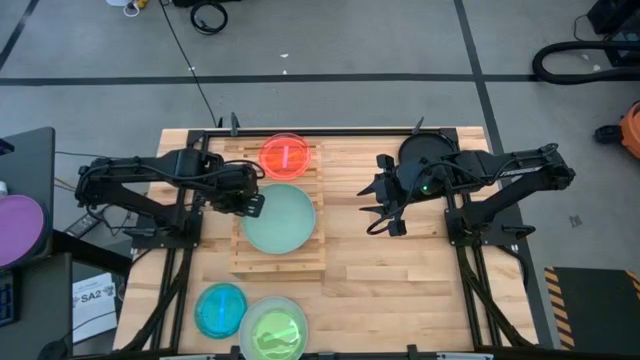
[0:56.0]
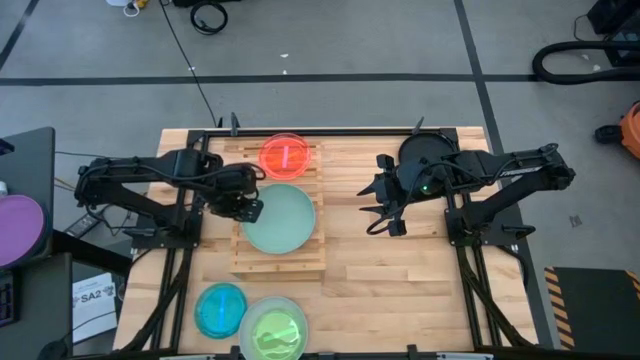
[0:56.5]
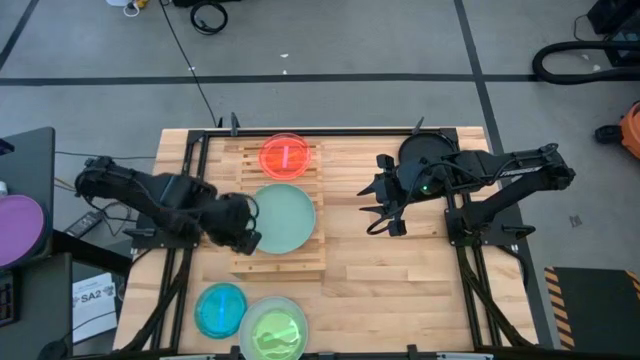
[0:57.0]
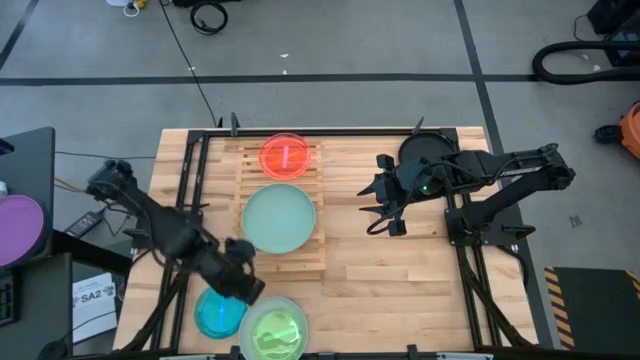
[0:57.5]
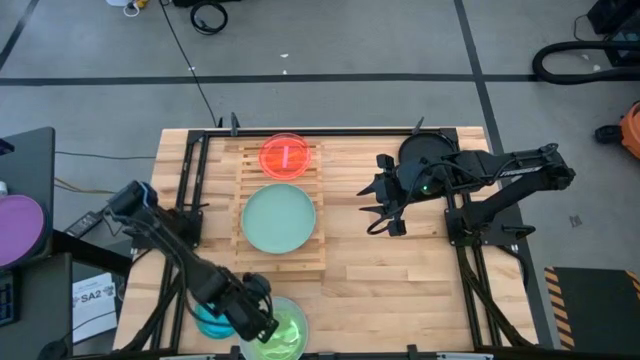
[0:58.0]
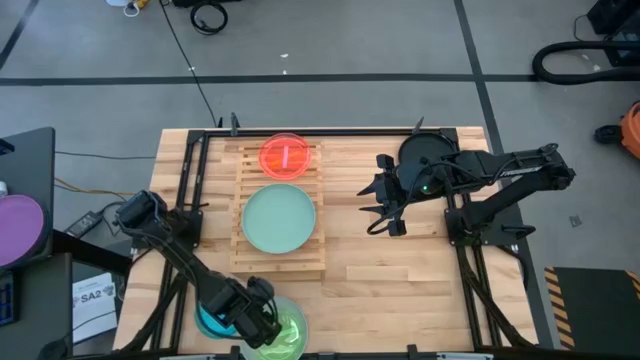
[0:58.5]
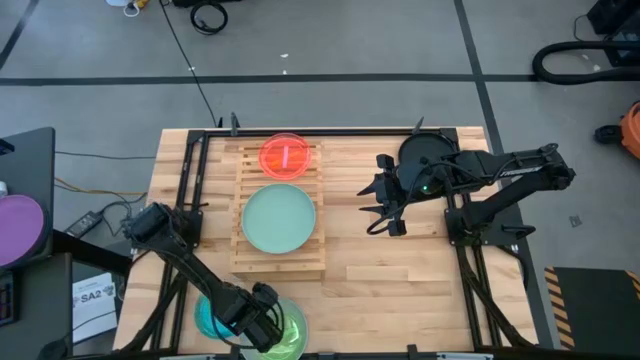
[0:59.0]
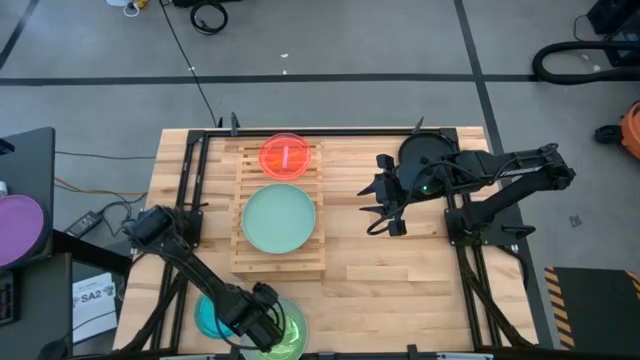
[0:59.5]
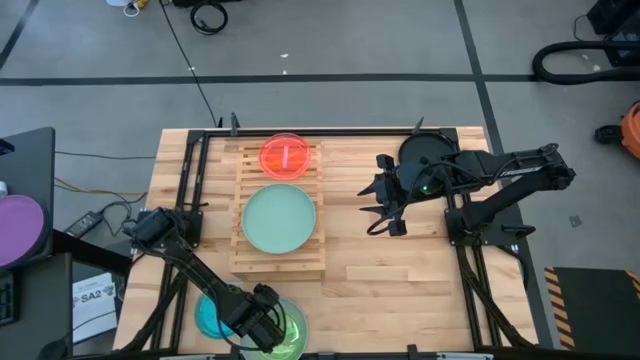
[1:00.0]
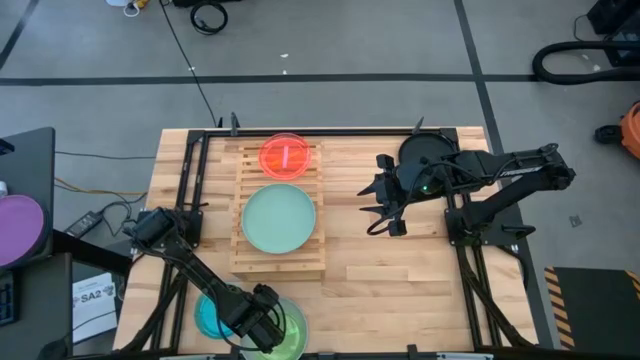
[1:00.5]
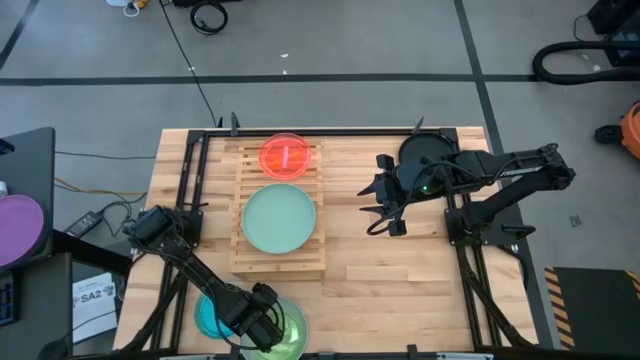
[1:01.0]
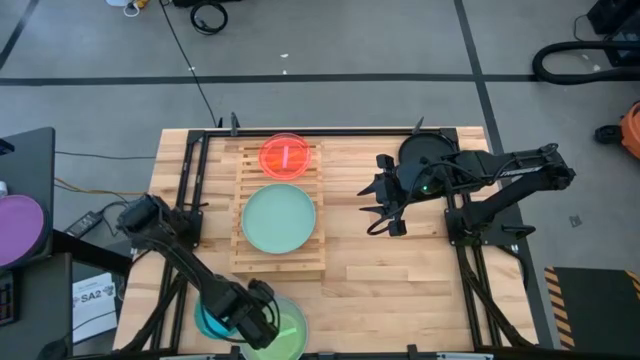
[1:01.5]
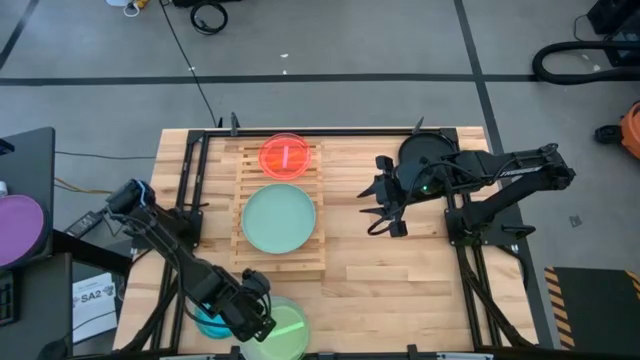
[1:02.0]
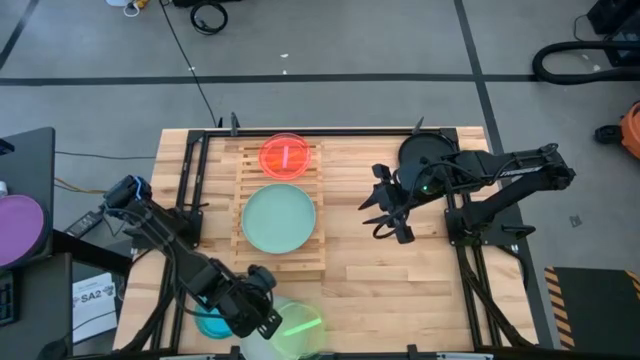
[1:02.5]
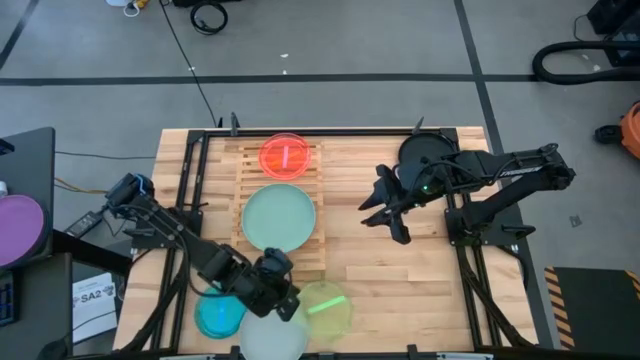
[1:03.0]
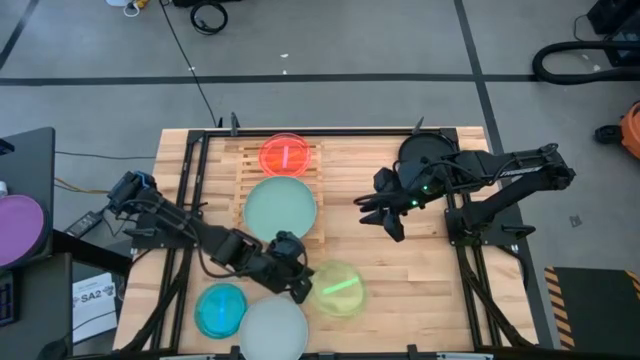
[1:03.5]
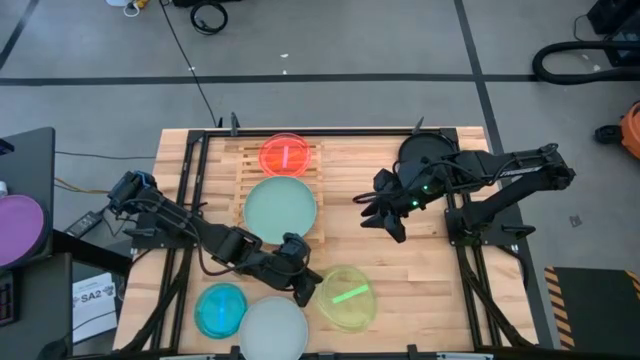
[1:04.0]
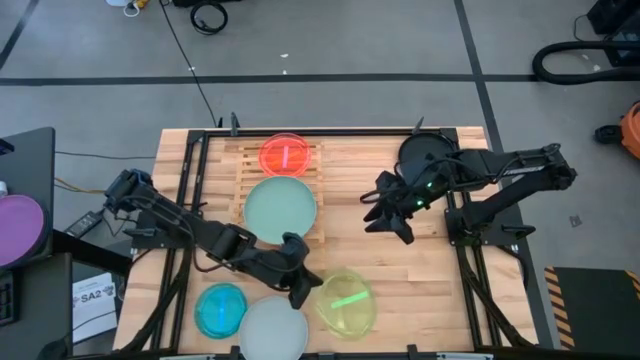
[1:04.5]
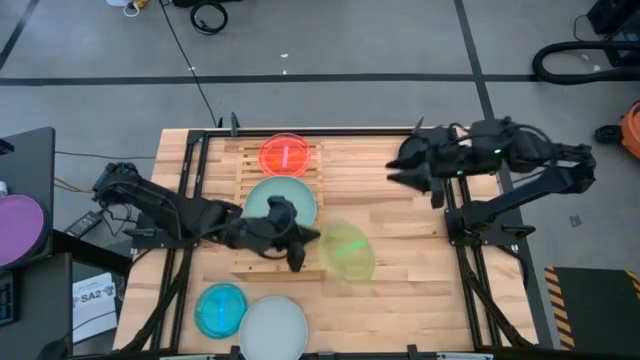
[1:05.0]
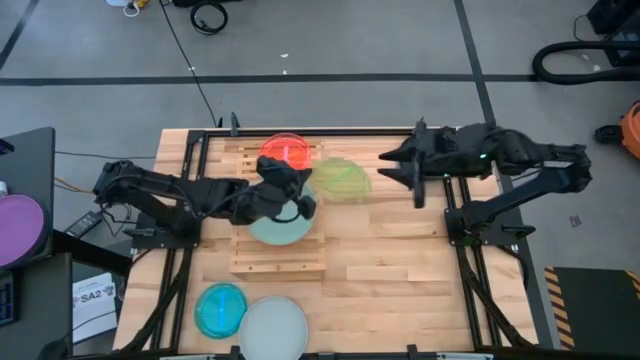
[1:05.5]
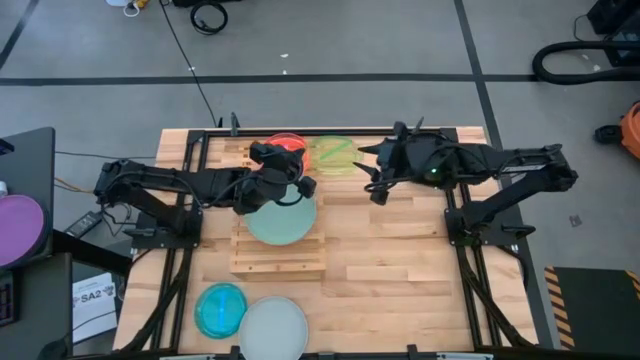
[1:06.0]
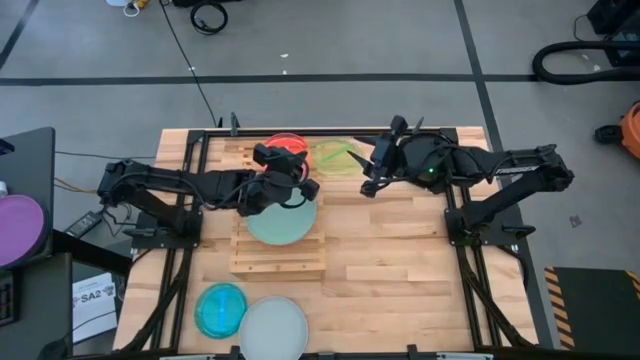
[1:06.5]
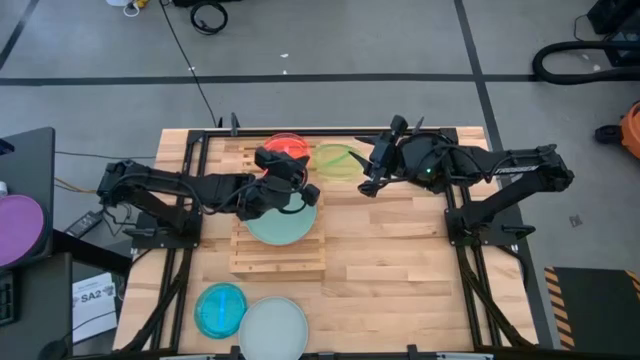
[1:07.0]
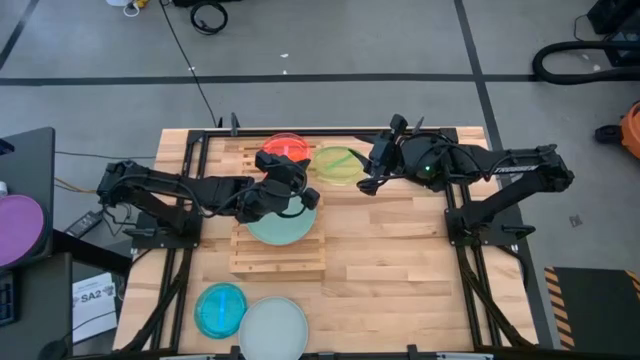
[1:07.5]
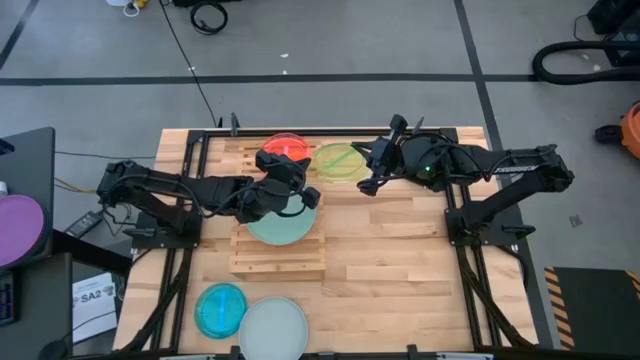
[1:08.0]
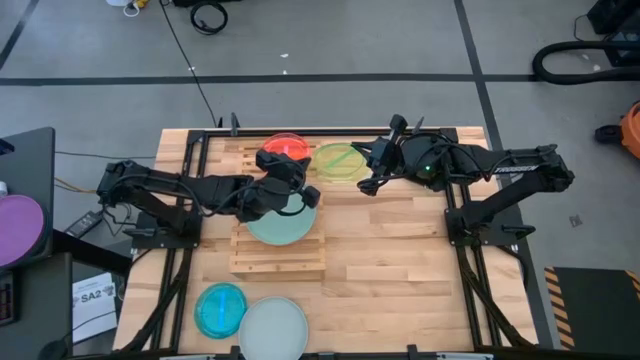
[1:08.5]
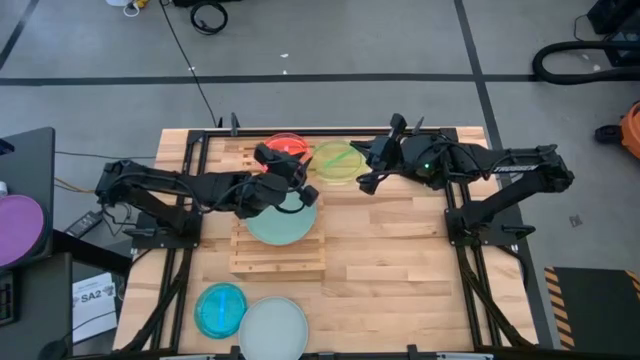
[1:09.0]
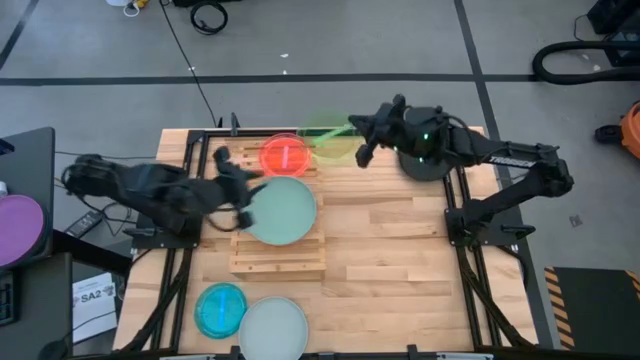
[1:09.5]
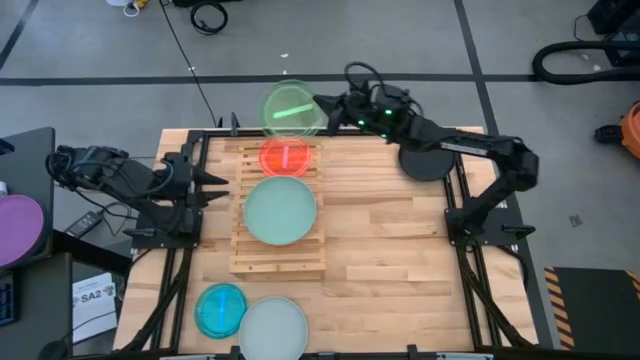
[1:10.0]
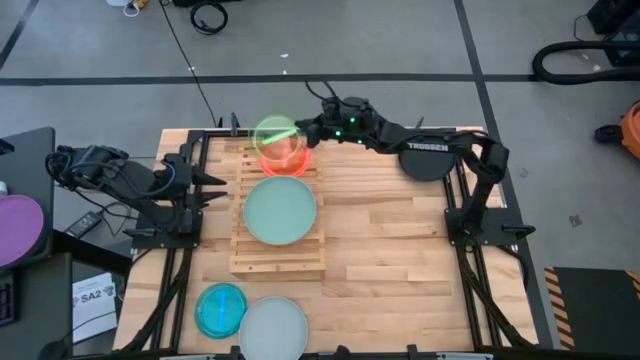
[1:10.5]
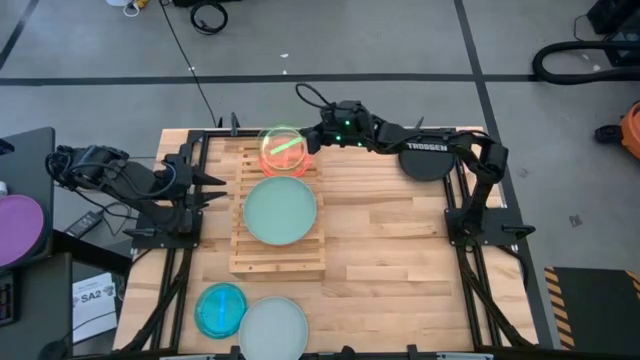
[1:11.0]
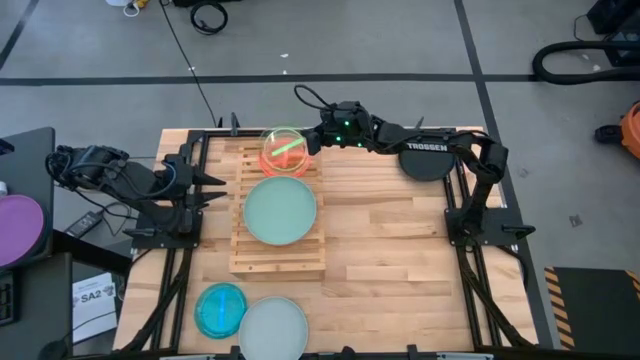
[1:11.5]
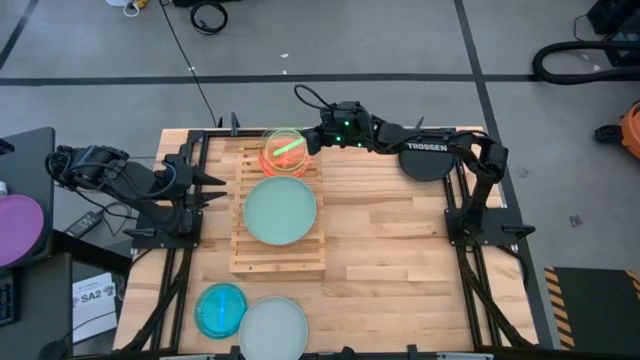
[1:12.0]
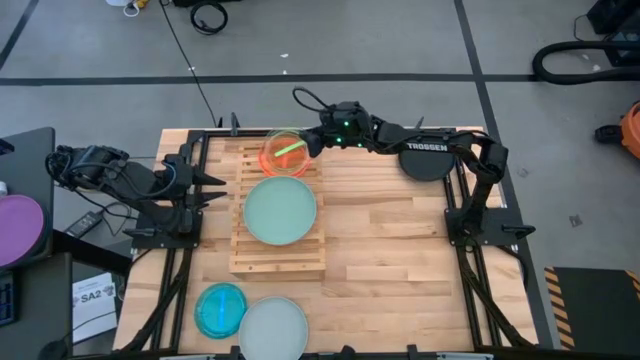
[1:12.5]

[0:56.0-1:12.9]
Task: Place and stack plates onto a shelf
Stack the green transparent plate on the pink transparent plate

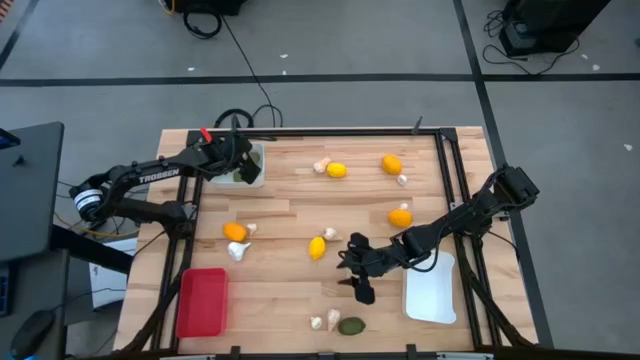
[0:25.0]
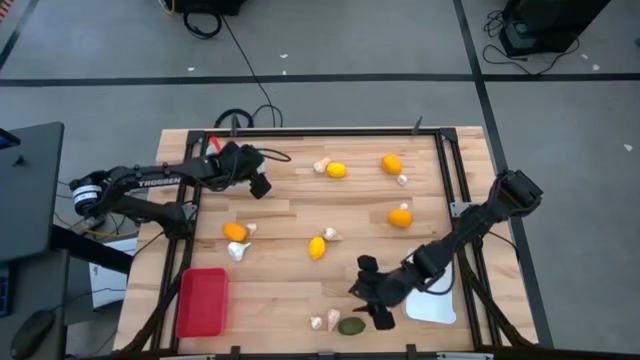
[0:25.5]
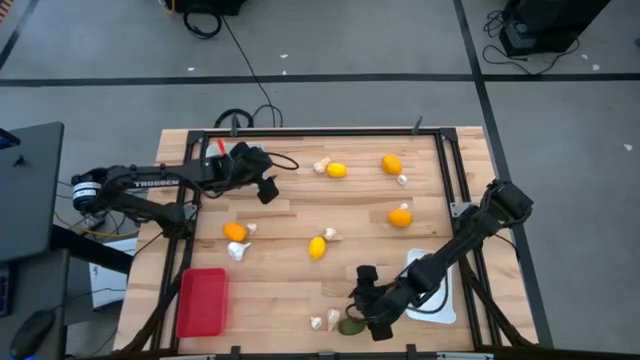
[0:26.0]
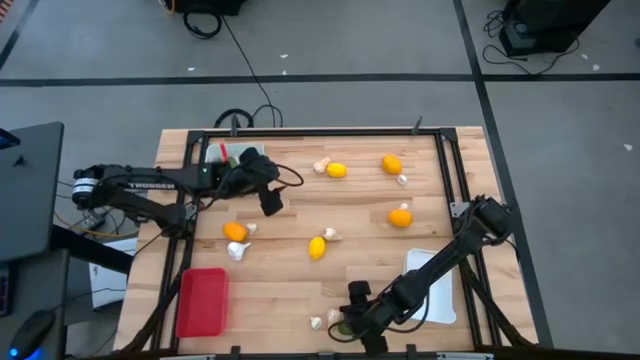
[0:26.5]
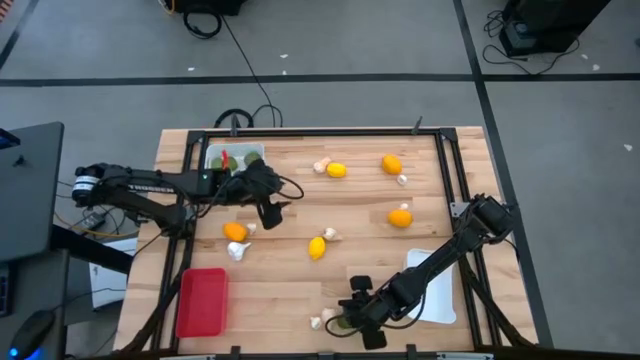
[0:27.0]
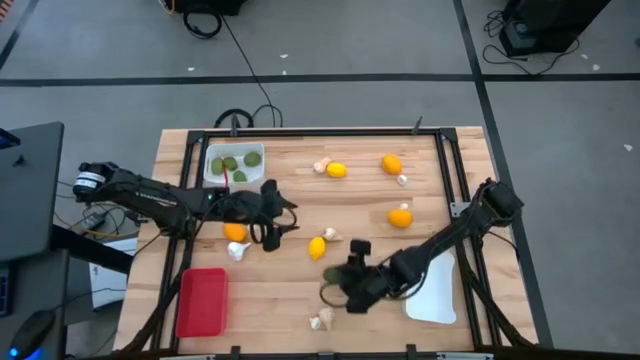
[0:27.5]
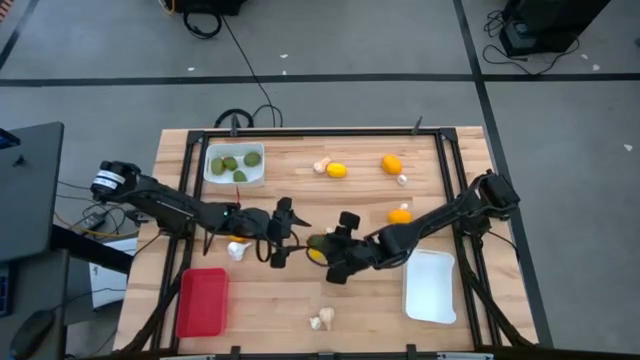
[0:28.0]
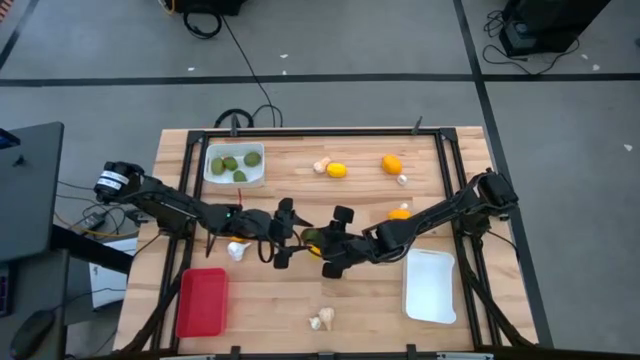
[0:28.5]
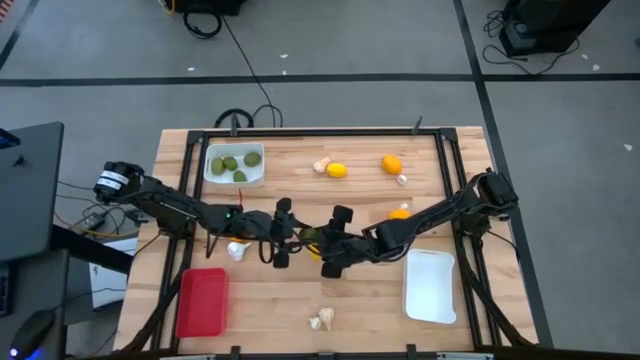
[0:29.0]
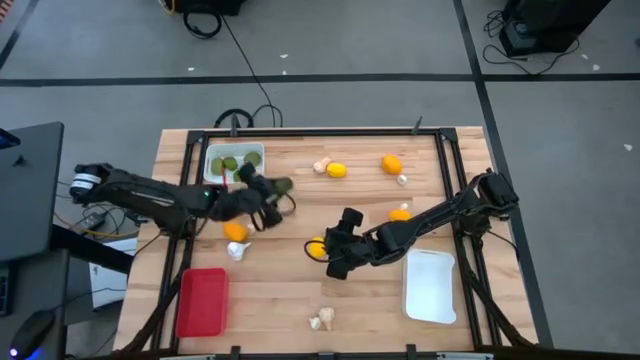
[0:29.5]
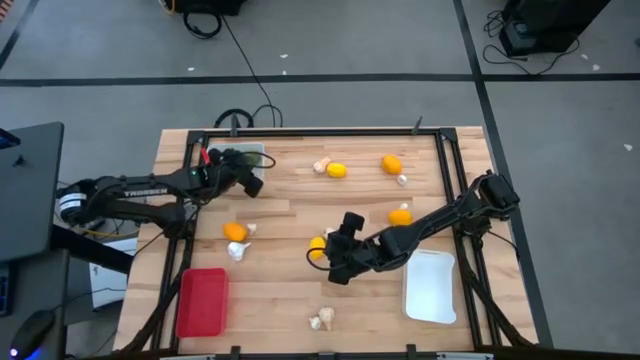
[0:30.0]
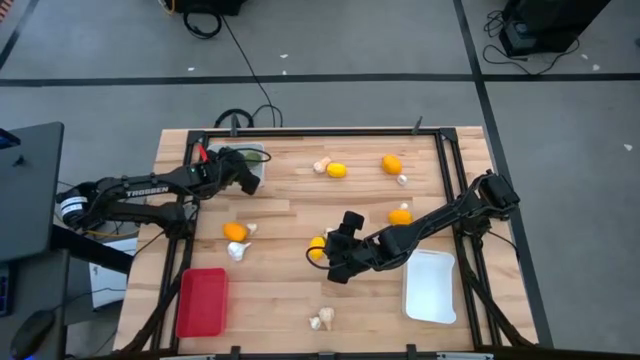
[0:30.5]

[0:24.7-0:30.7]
Task: Sort produce into baskets
Put the green lime into the top white bin
